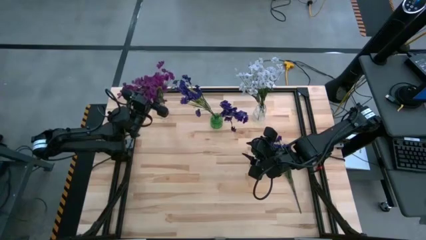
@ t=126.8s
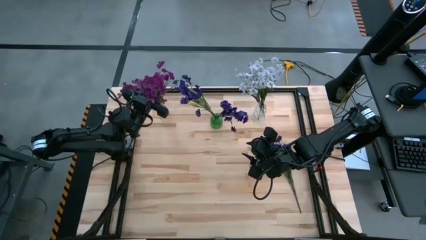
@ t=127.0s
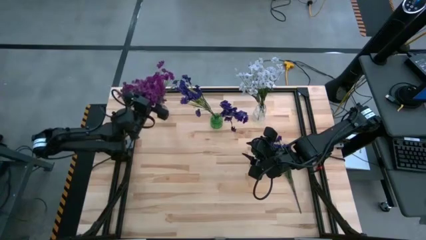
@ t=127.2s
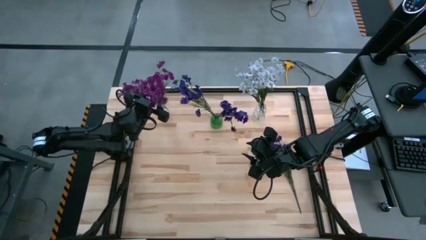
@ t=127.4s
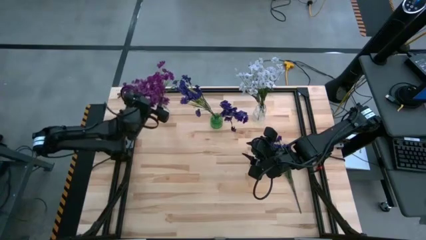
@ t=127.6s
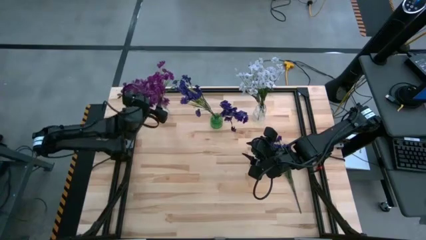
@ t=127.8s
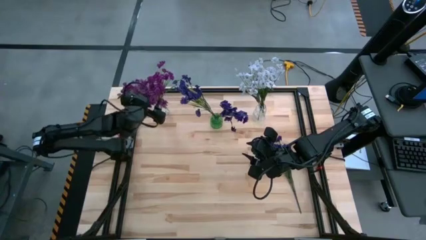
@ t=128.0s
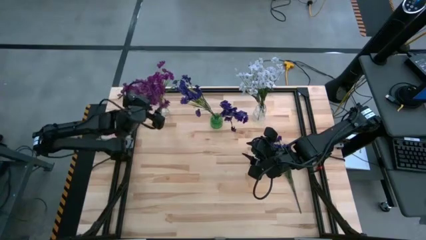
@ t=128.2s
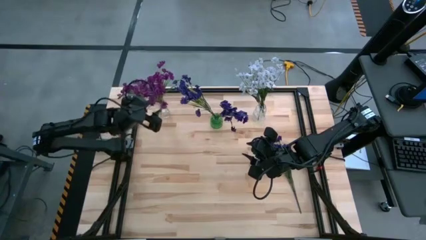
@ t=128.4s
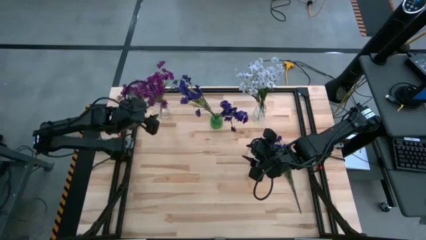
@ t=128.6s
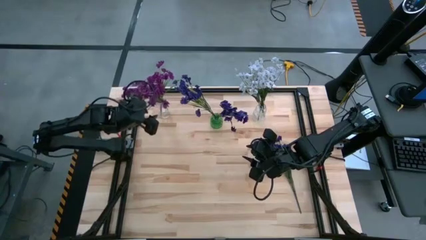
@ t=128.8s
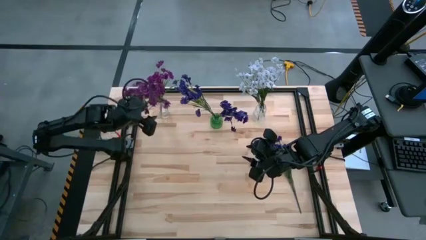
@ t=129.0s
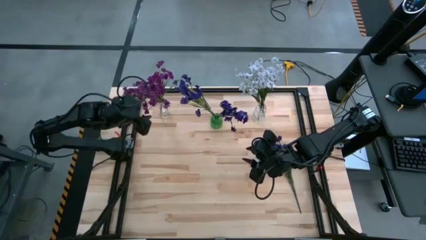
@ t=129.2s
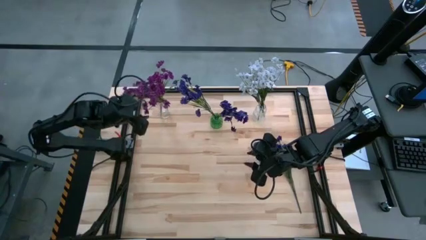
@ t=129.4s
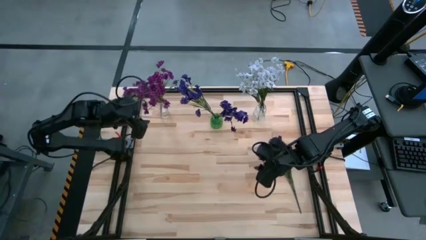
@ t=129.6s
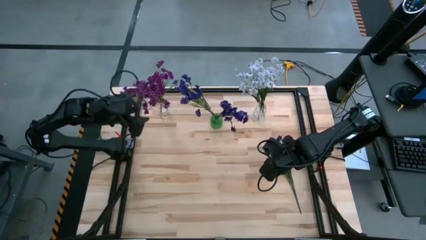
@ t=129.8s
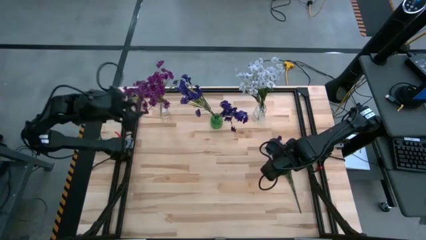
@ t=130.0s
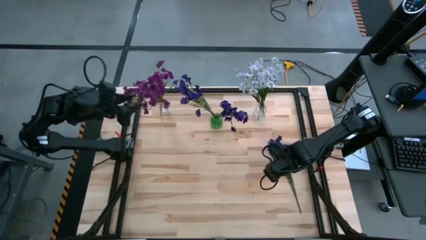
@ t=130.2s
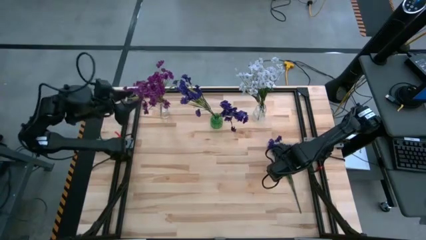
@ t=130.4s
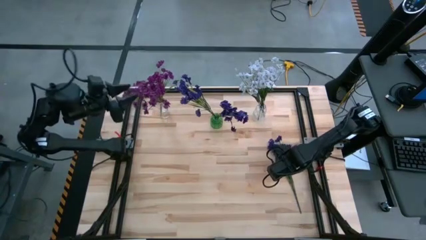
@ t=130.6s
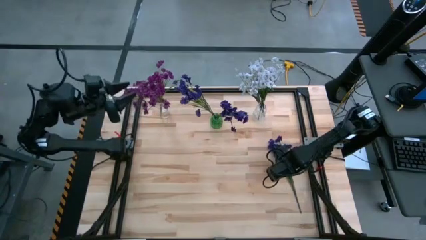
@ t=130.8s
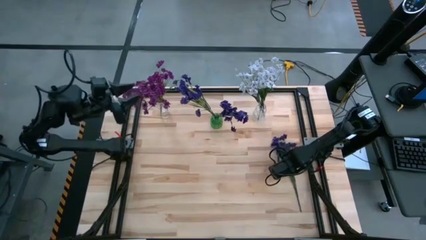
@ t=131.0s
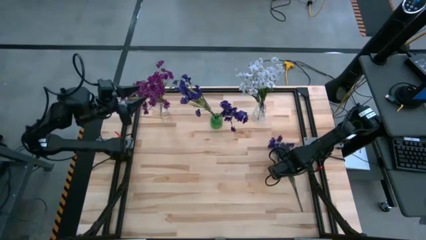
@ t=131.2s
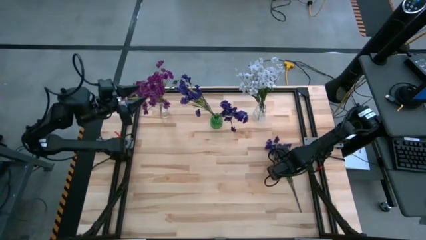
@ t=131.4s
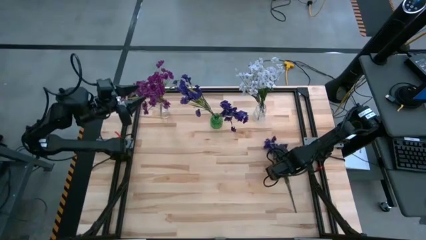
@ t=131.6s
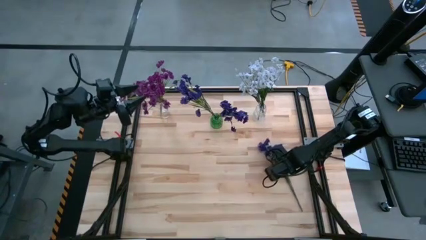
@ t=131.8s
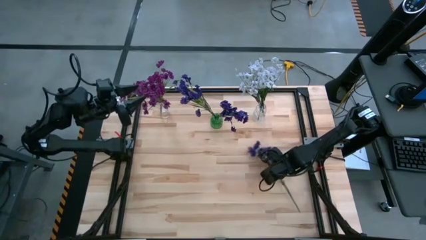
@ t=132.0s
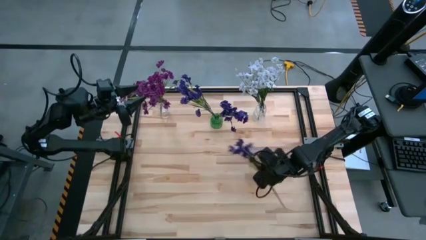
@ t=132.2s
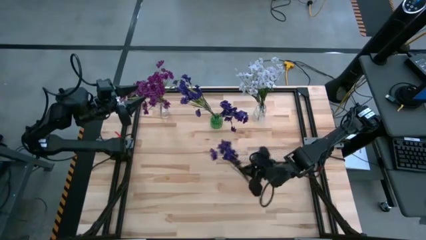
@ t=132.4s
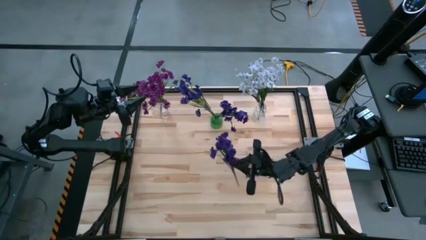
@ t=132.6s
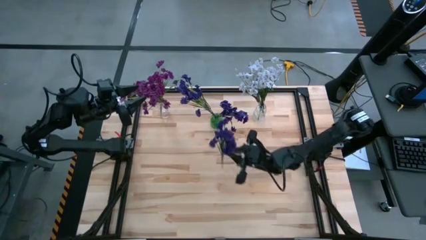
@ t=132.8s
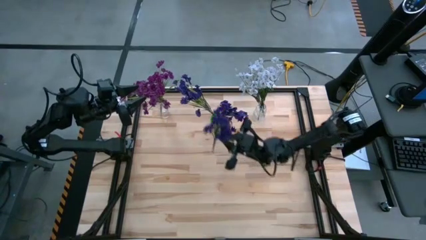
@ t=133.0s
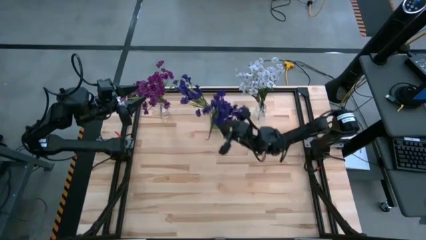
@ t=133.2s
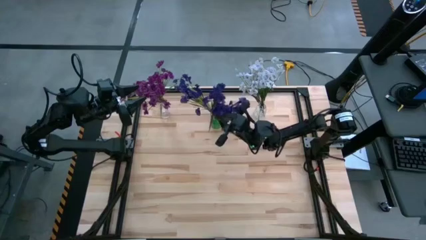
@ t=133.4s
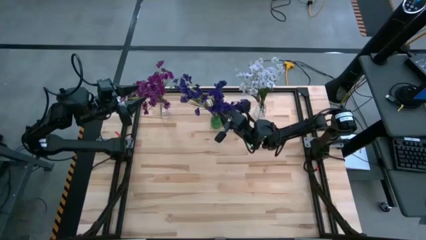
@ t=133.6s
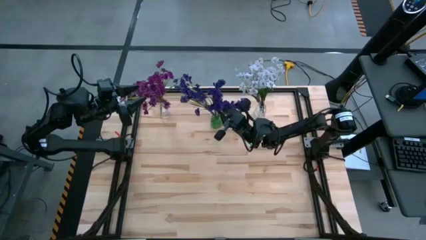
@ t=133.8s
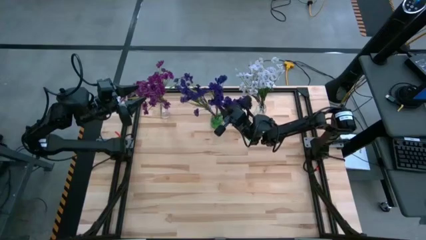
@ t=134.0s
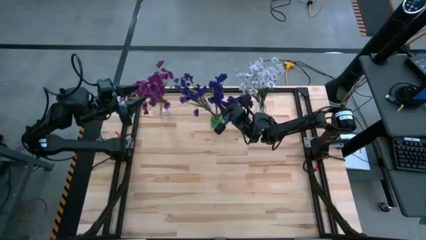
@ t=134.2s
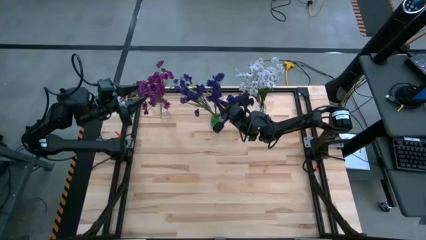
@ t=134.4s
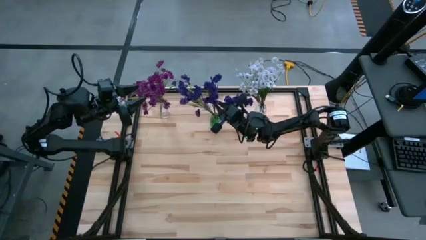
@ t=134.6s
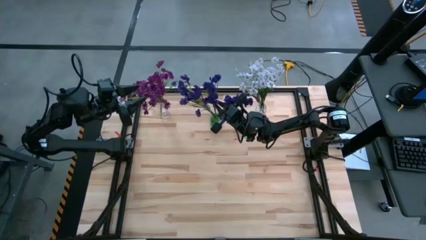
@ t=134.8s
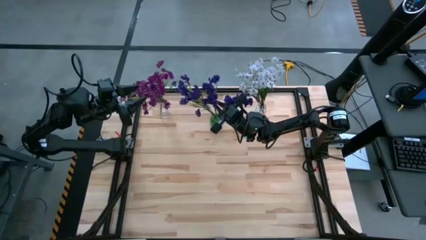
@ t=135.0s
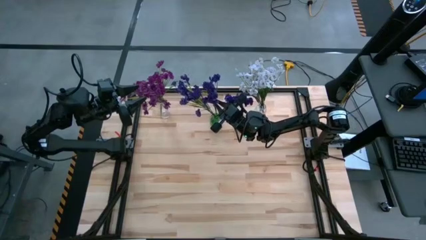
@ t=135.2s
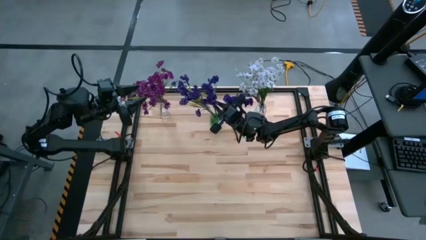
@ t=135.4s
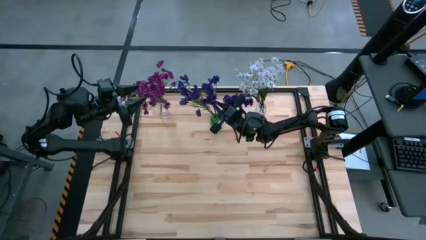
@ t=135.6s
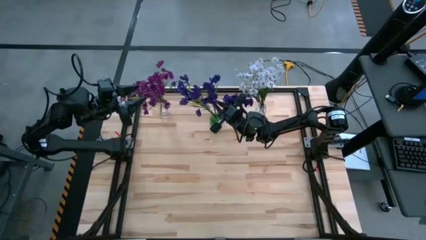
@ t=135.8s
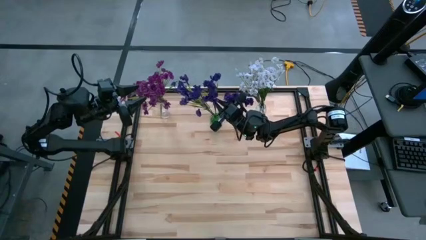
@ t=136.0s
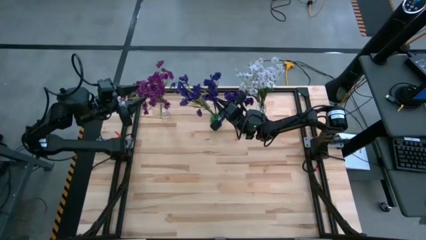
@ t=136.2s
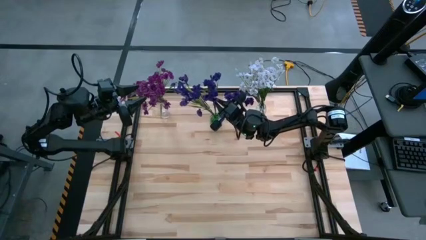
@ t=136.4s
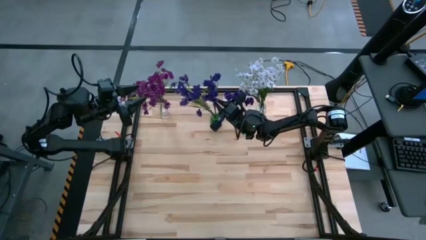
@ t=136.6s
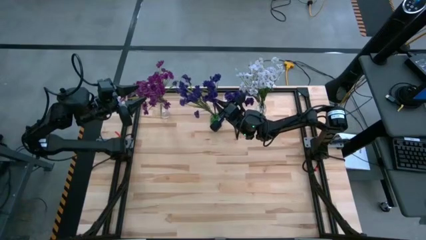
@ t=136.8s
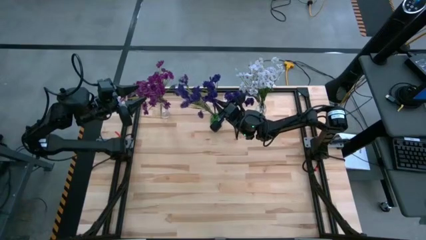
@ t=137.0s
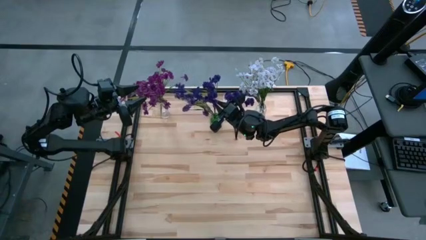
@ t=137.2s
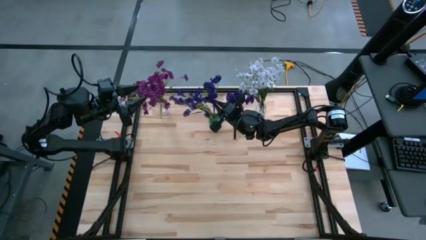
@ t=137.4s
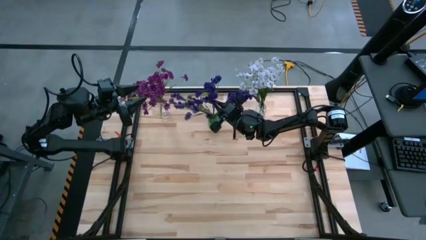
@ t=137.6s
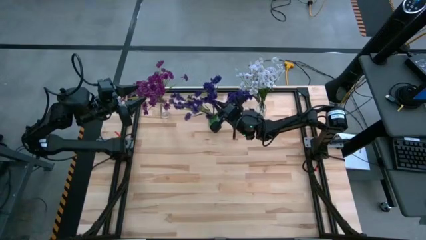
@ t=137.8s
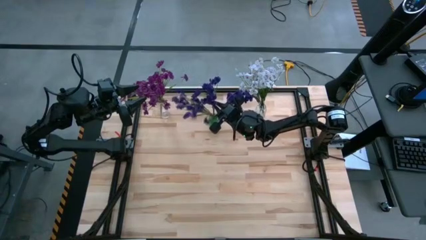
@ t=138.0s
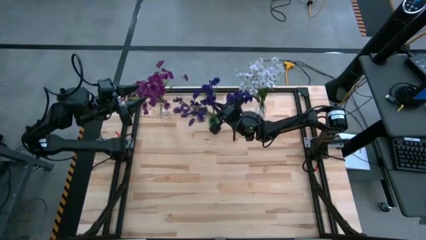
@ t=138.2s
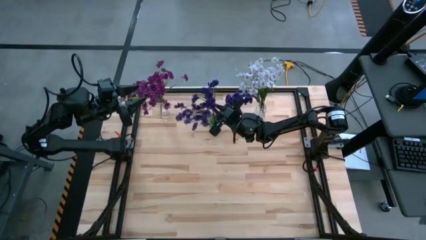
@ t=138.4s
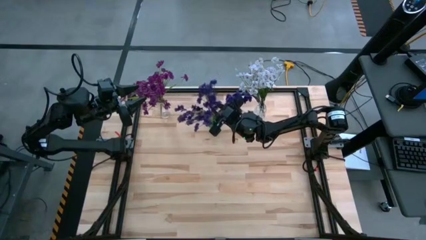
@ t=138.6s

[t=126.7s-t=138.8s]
Task: Sort flowers into vase by color
Put the blue flowers into the green flower vase
